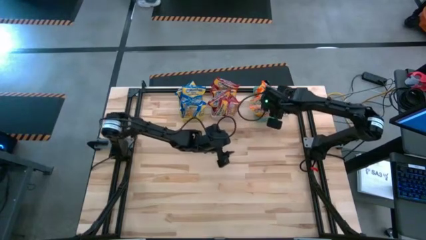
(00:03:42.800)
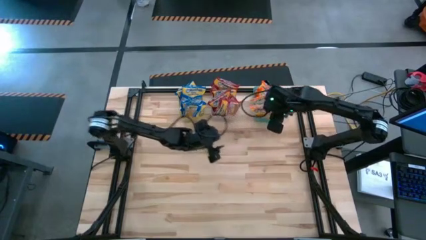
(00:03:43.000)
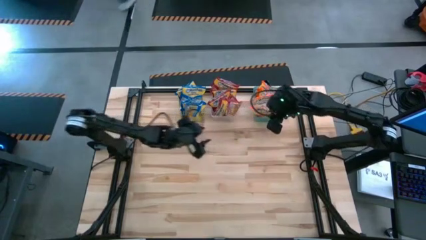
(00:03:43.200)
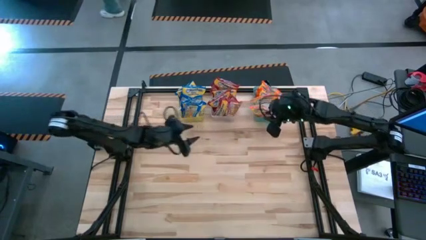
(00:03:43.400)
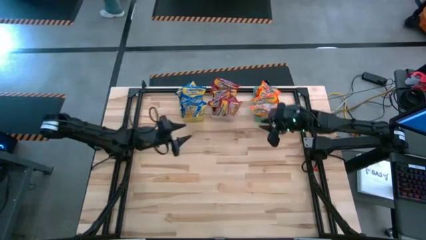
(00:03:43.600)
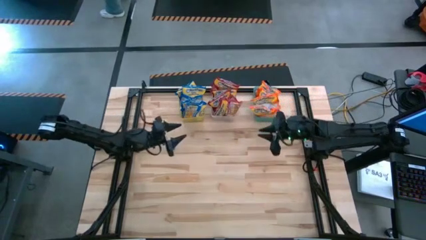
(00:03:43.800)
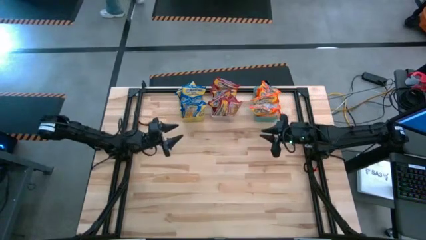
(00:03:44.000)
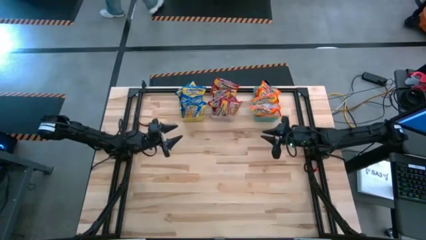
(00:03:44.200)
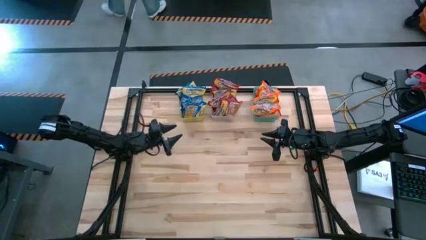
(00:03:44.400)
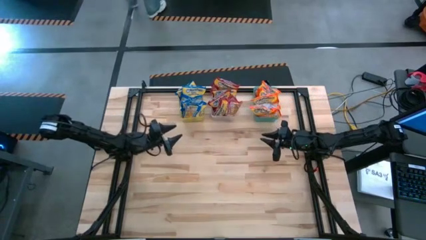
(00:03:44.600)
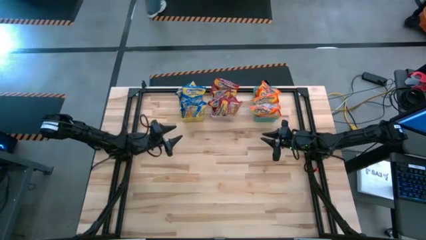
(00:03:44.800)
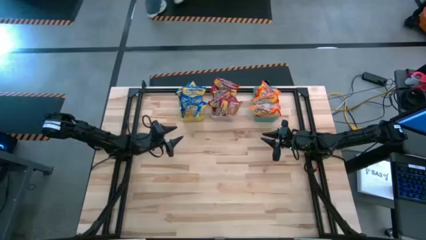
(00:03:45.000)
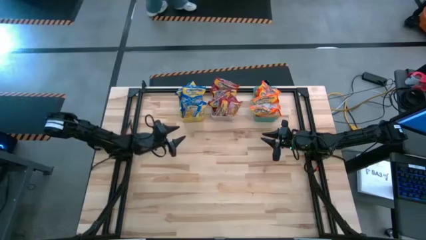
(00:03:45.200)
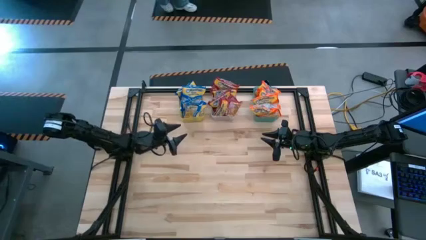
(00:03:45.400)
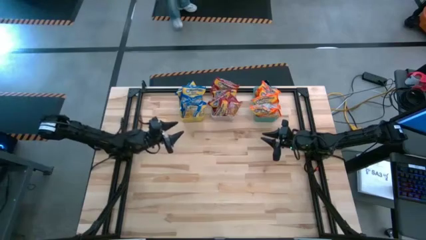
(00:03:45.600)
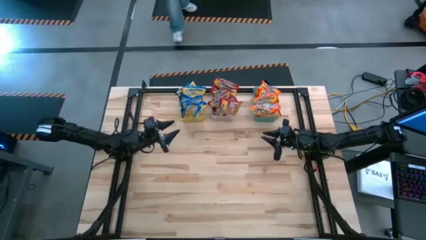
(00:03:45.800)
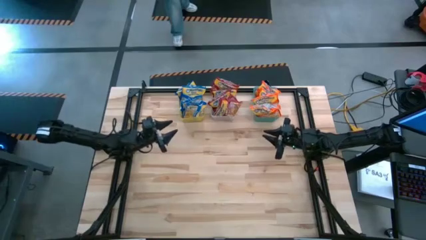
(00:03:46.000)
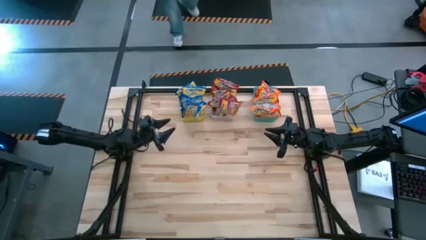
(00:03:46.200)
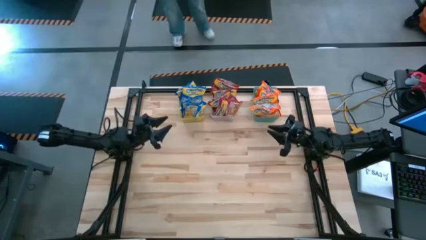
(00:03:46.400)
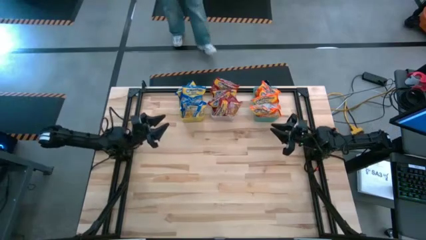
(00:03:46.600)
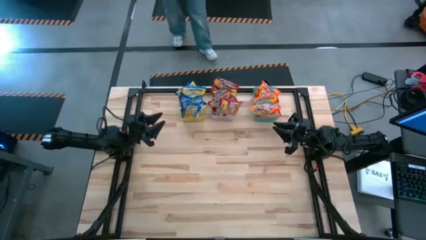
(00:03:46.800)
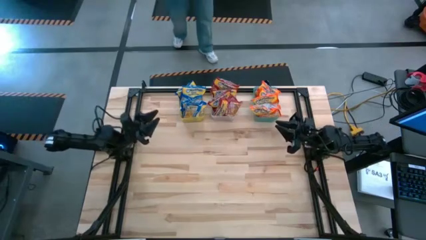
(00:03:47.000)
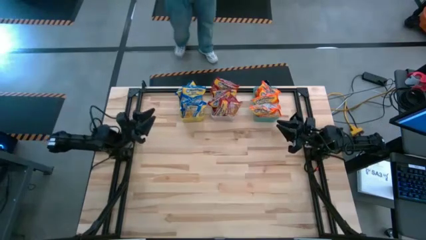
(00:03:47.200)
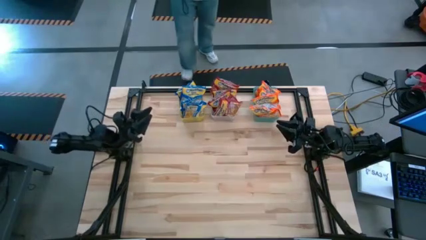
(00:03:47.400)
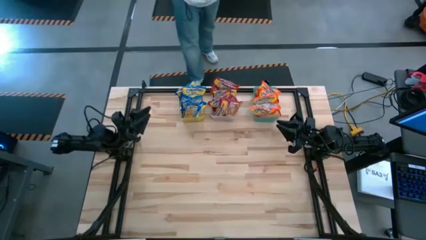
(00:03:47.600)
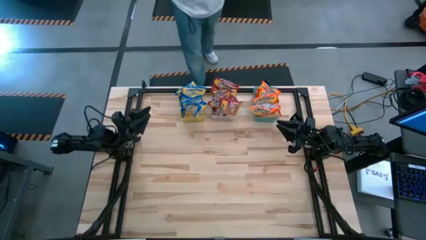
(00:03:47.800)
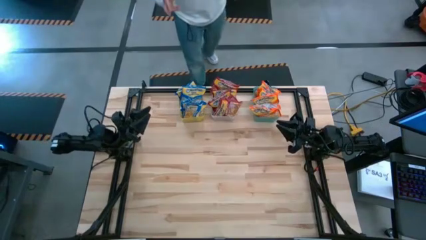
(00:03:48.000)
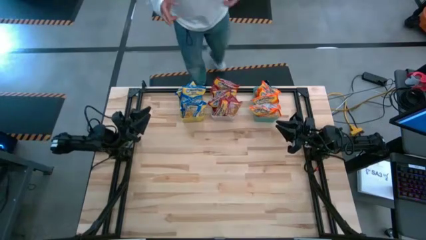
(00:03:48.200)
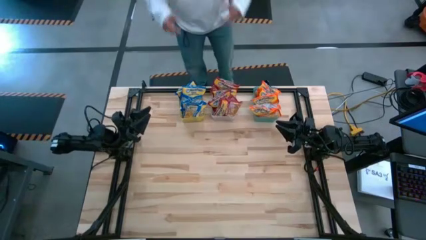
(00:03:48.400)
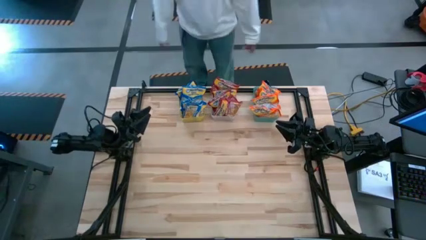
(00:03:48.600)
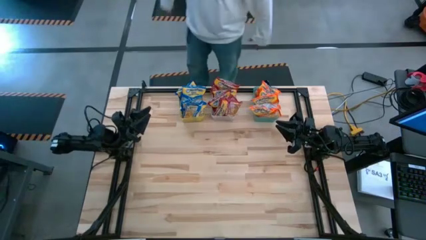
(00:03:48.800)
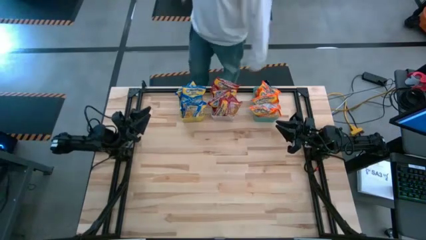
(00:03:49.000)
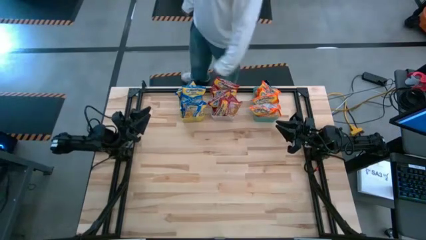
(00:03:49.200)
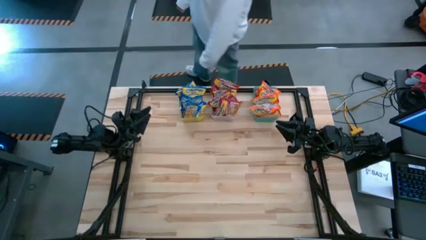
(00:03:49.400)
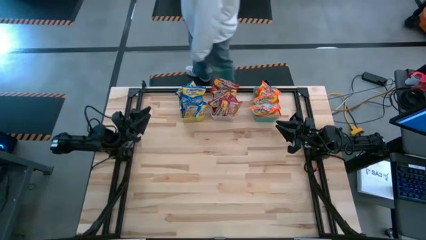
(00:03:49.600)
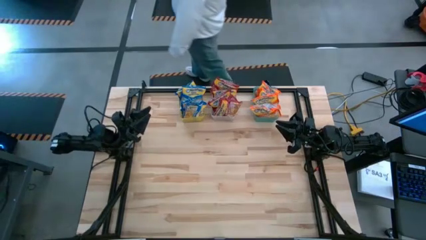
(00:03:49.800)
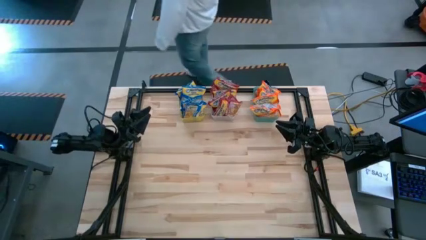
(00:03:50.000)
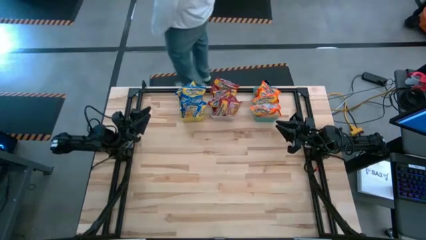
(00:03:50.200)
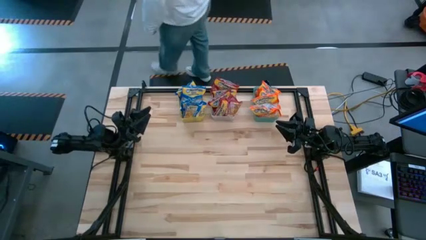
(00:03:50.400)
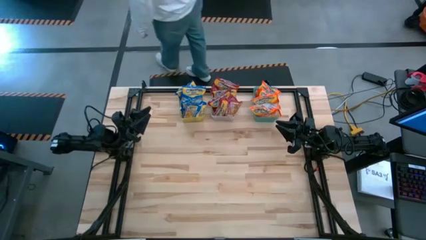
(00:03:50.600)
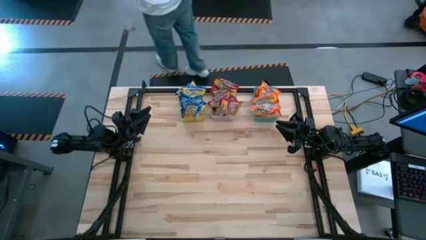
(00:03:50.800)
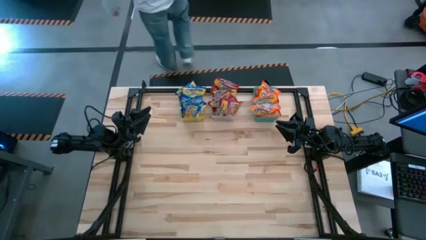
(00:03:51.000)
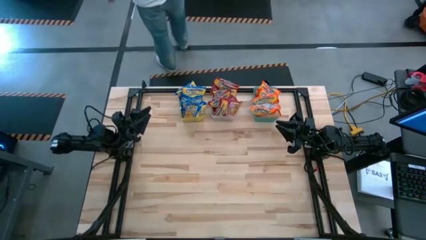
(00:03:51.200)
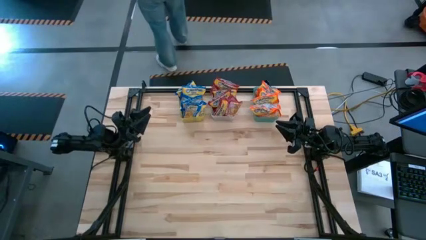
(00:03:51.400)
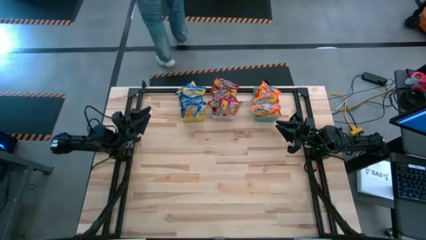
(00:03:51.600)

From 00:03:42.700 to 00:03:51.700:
Task: Sort Maruchan noodles
Return to Home Position

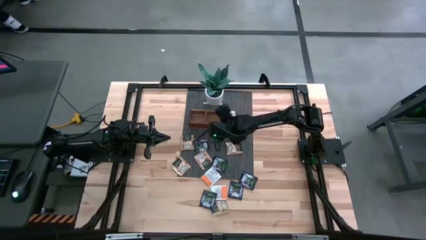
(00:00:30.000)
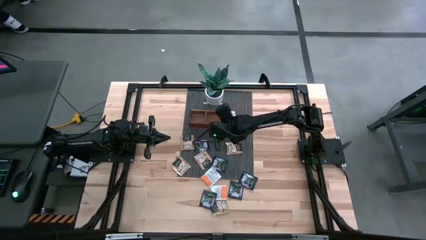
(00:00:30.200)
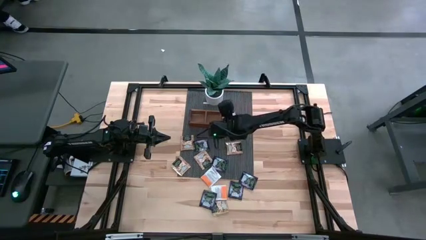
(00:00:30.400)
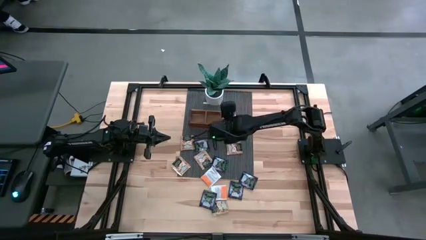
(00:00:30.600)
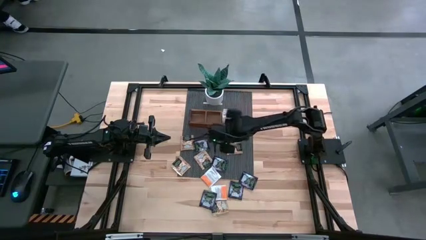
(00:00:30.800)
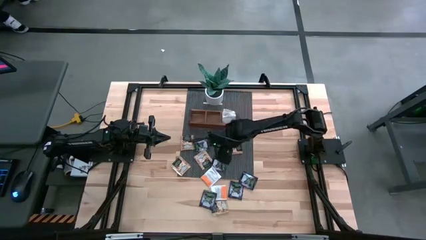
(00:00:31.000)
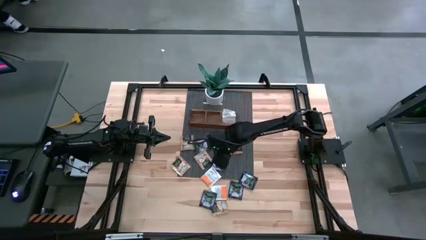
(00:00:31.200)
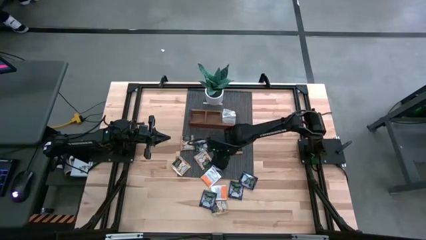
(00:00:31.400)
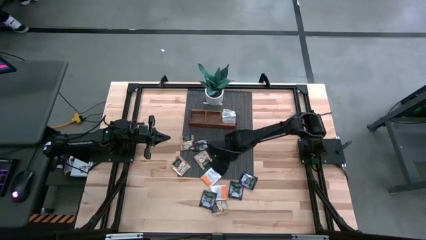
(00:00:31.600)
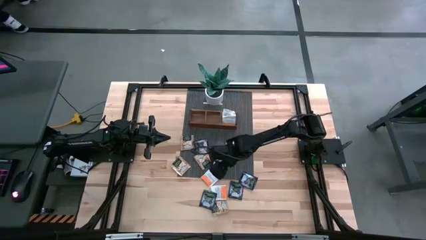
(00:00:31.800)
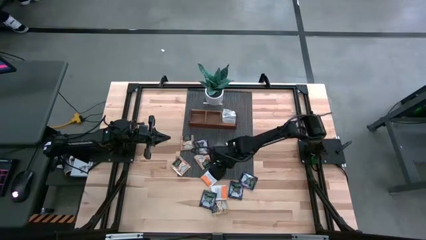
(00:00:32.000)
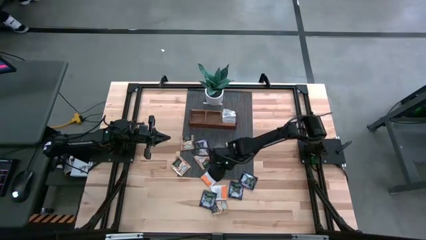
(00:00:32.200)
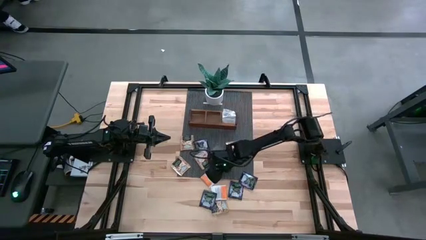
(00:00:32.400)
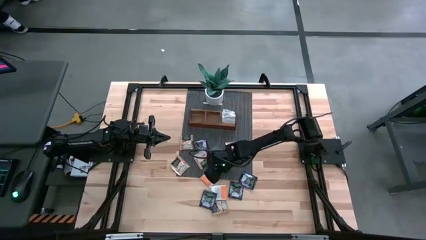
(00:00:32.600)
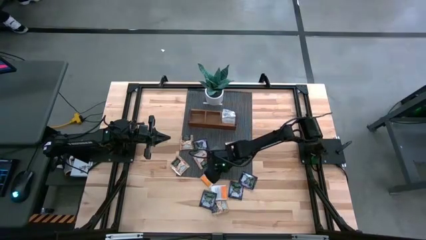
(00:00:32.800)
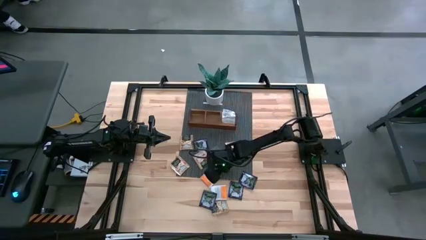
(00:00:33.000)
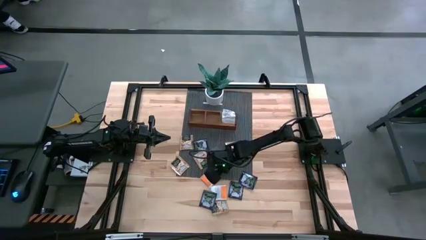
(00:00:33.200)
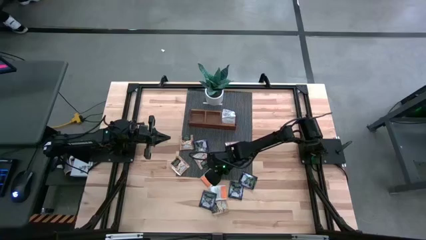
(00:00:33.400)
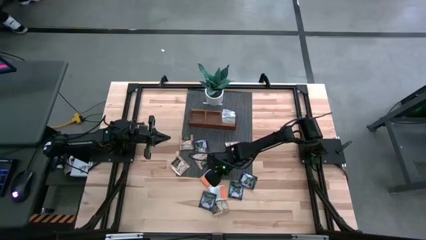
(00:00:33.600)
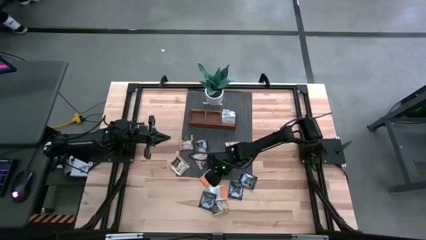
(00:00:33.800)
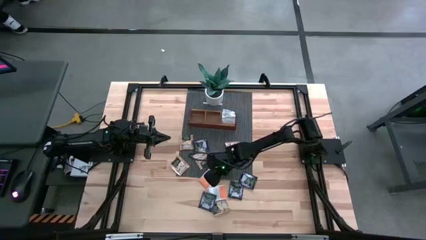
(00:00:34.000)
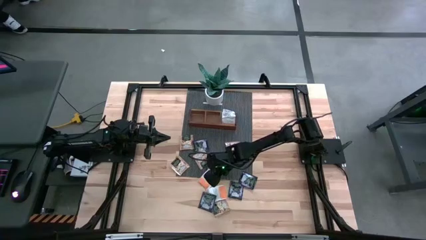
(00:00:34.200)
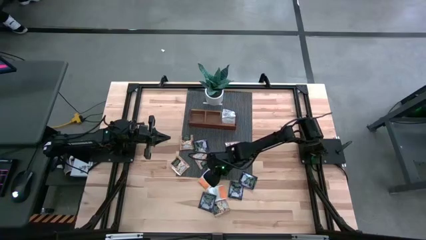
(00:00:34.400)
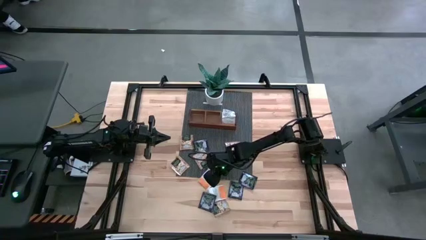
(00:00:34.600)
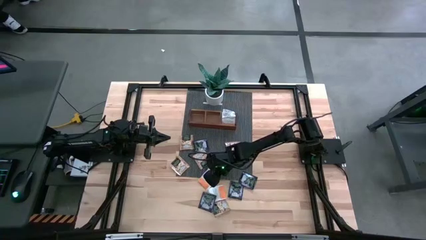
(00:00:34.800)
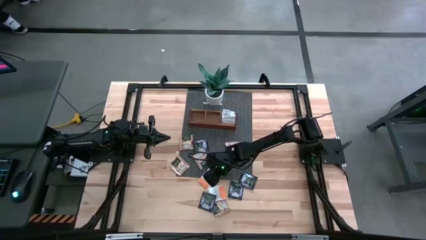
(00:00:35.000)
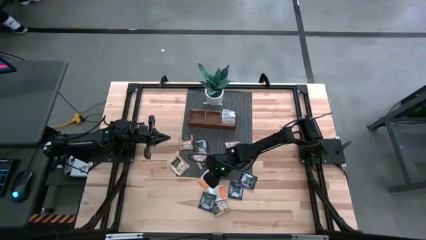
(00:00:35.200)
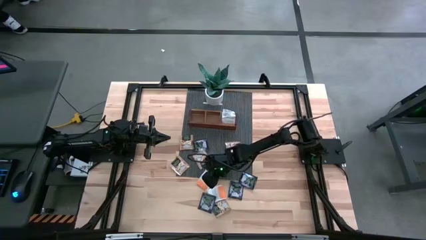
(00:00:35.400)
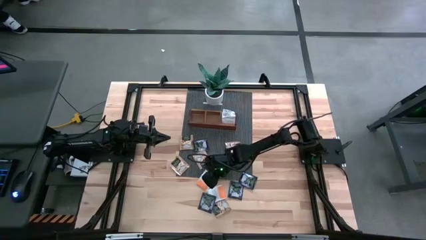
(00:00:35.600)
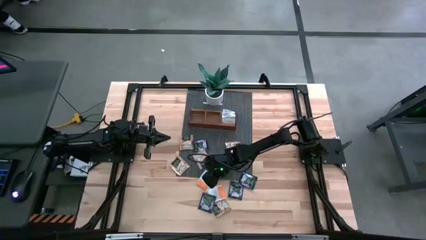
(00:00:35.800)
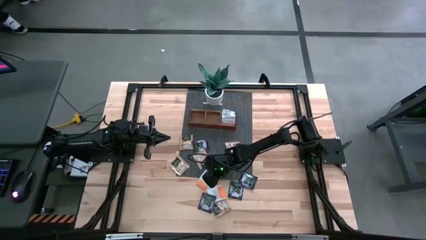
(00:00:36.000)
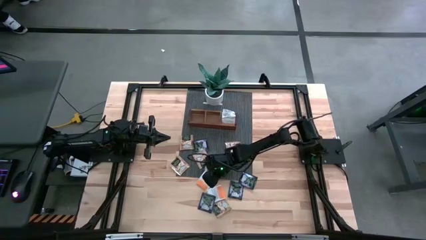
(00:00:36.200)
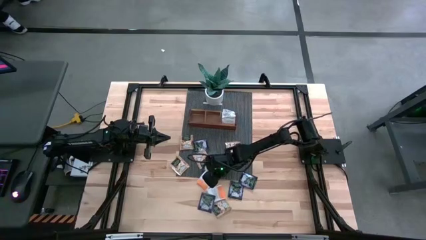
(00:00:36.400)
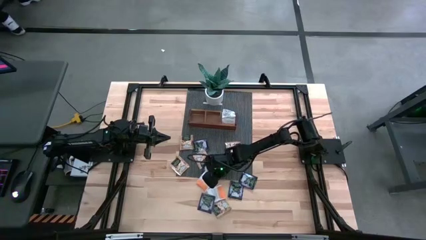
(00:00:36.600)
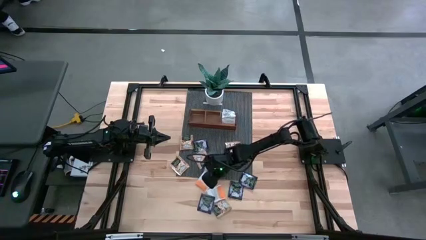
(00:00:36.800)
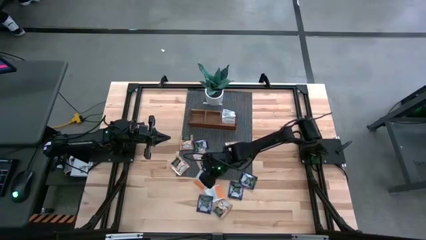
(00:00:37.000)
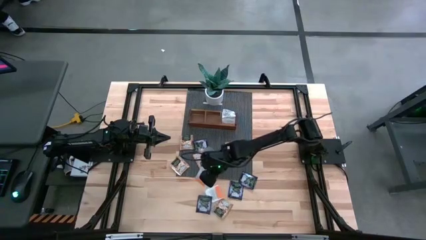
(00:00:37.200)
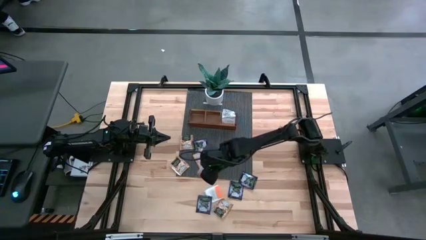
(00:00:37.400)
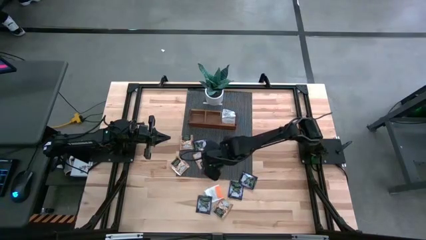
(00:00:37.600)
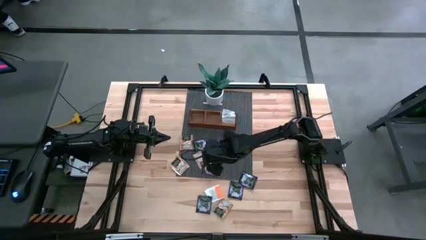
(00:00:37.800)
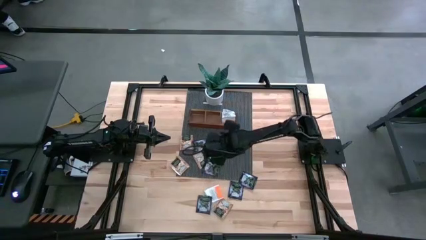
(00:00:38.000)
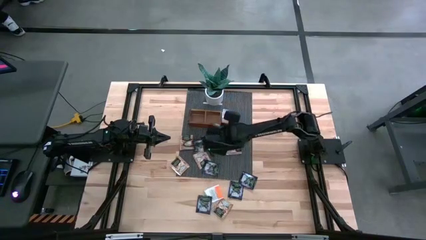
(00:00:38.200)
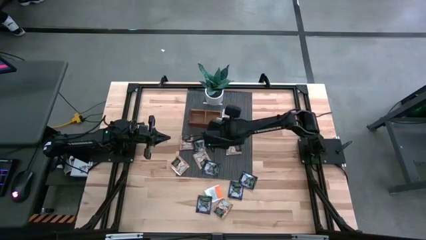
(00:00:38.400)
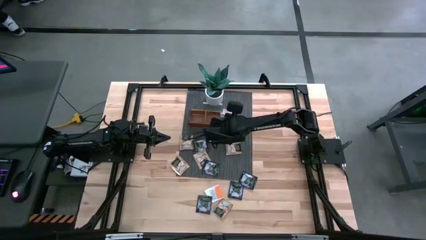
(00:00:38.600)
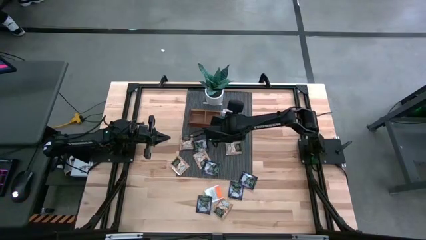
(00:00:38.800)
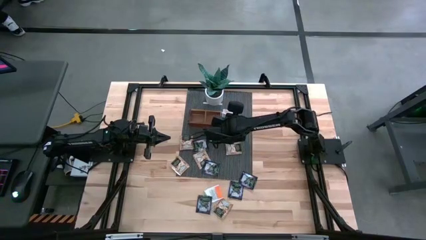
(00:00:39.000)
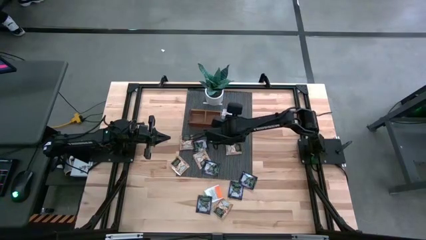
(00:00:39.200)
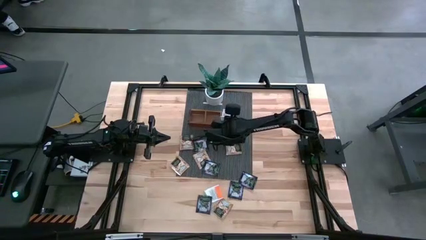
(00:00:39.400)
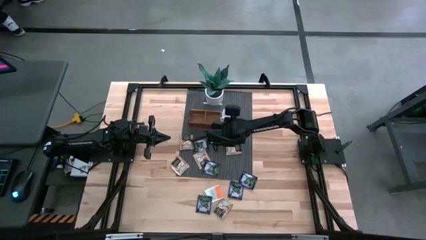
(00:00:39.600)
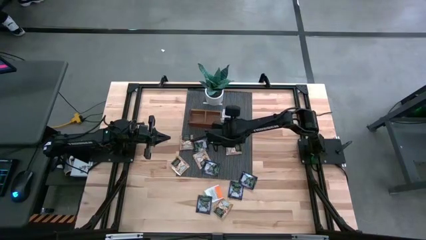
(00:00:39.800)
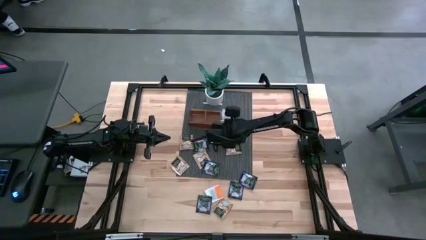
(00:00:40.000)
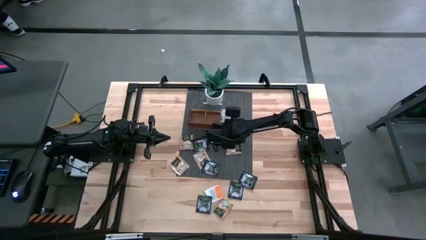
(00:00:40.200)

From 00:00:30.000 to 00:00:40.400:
Task: Pick & Place Tea
Put the orange tea bag into the right section of the wooden organizer
